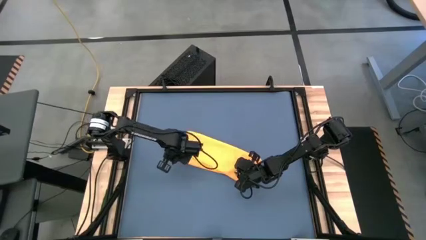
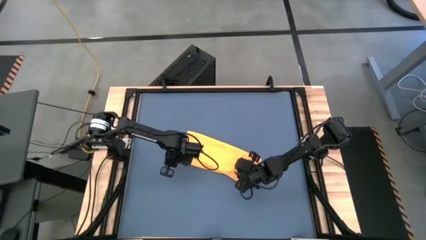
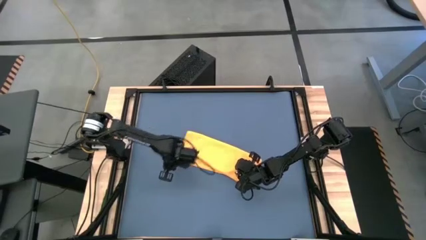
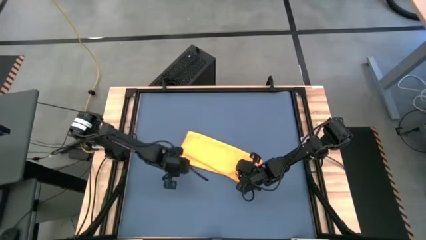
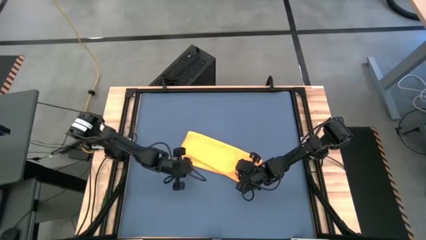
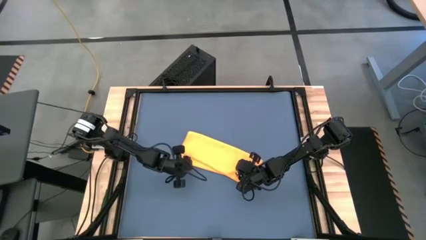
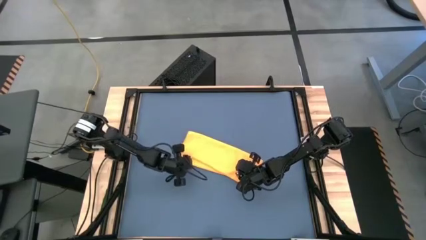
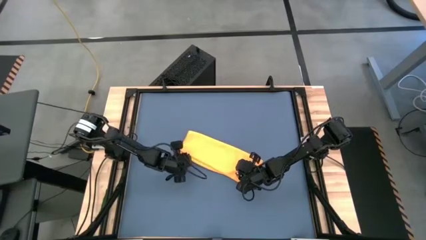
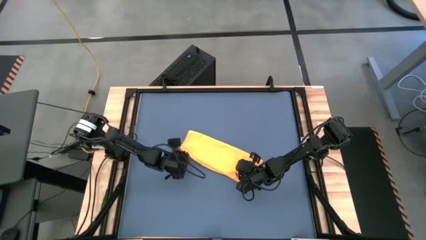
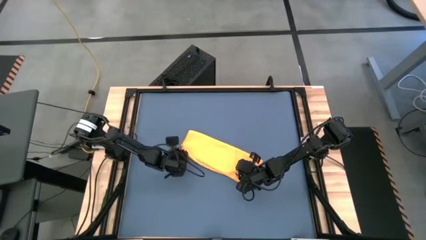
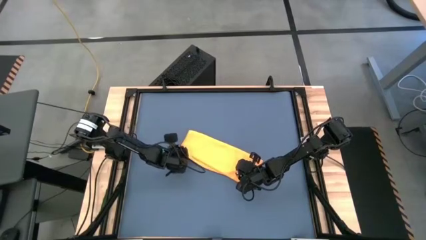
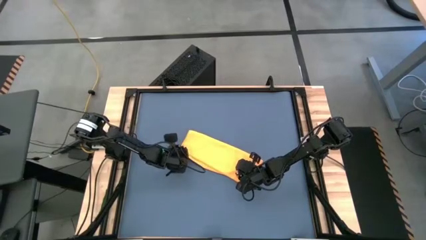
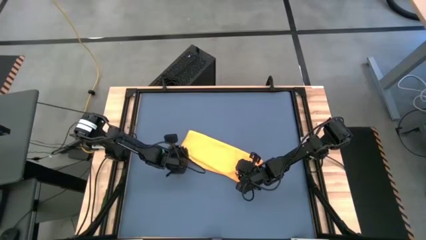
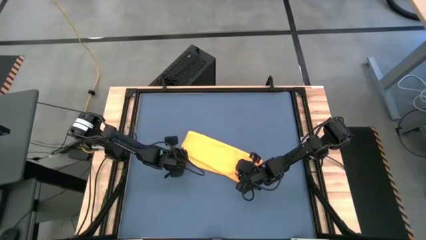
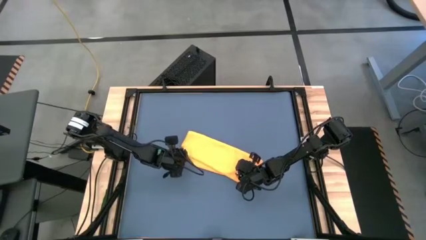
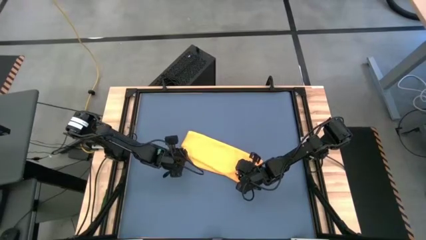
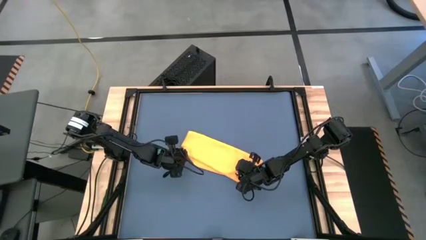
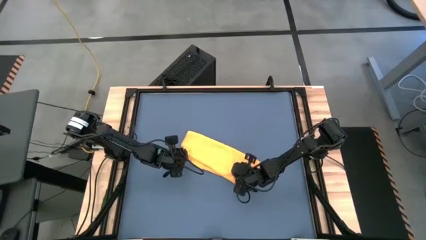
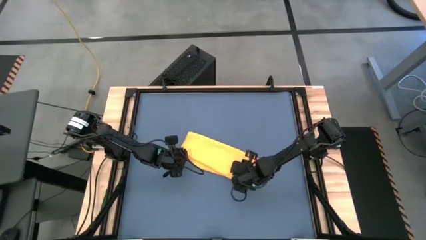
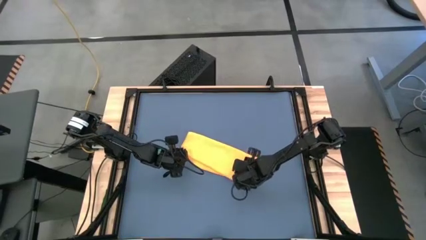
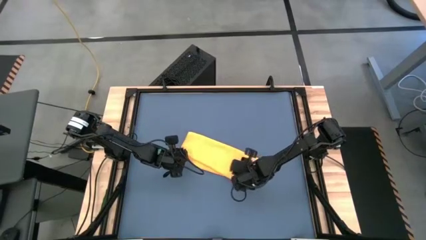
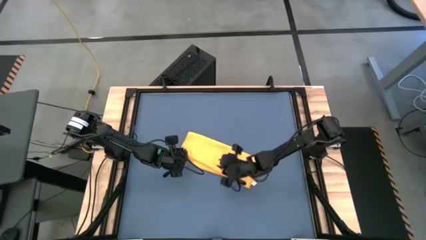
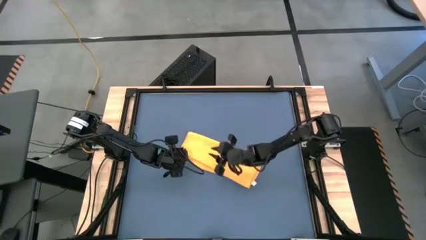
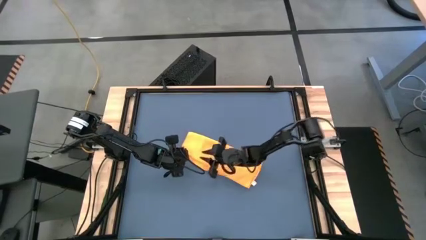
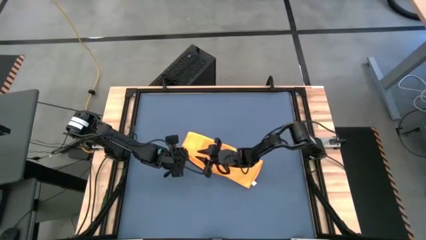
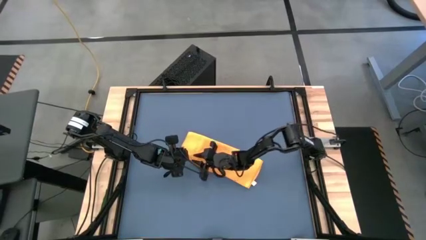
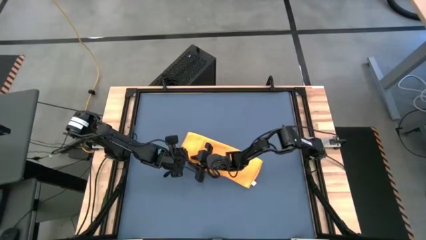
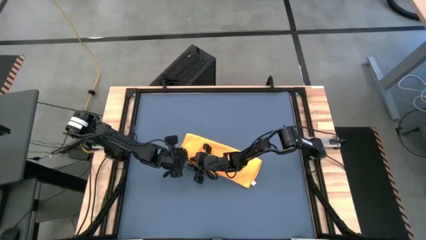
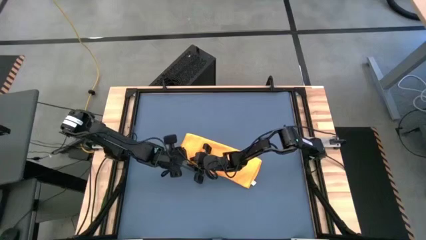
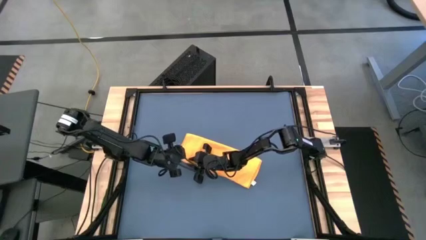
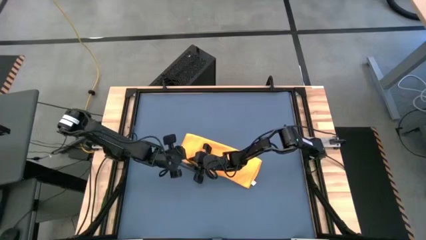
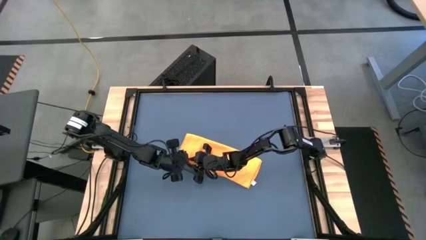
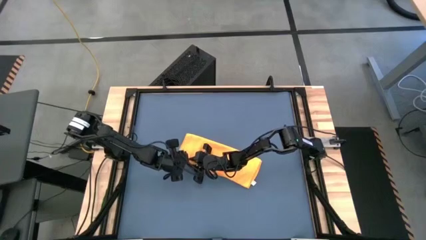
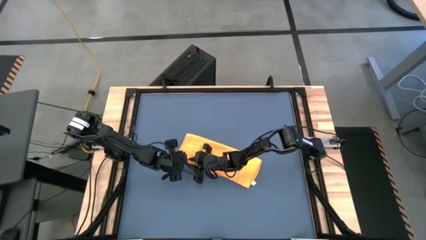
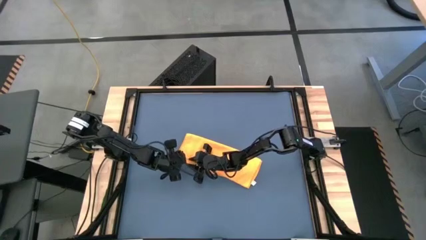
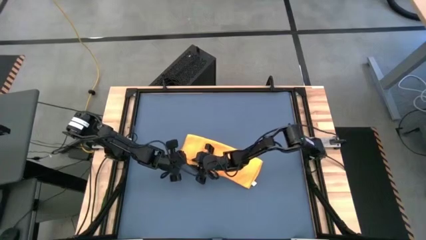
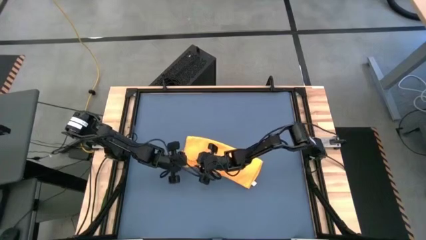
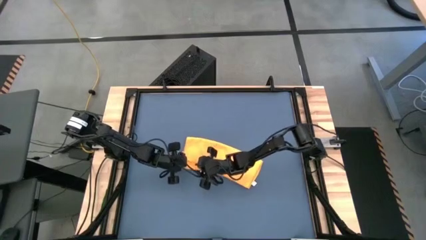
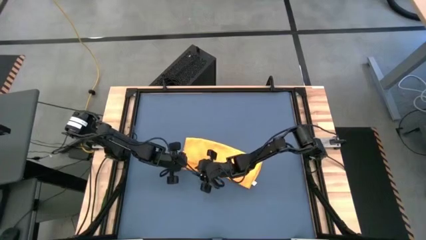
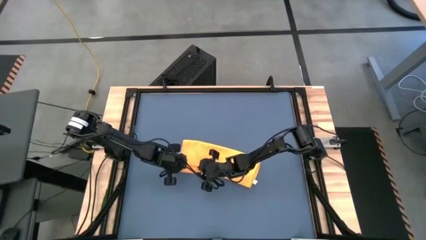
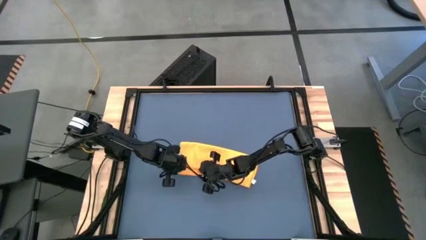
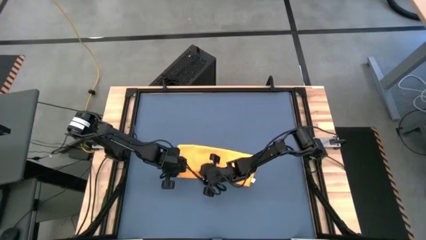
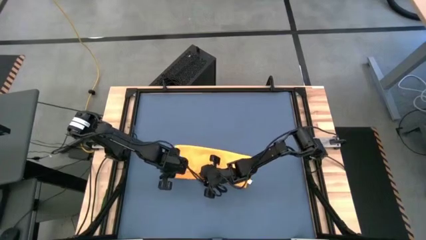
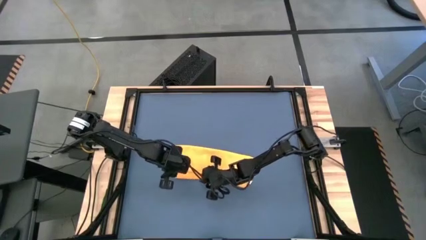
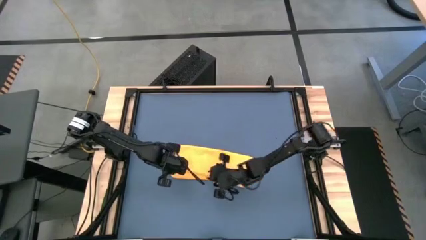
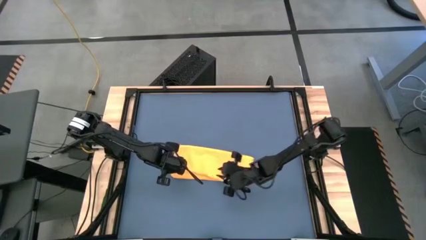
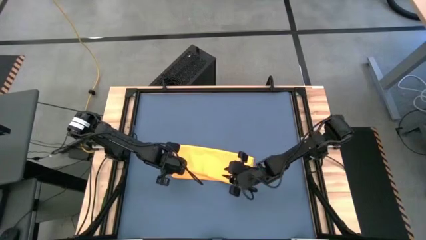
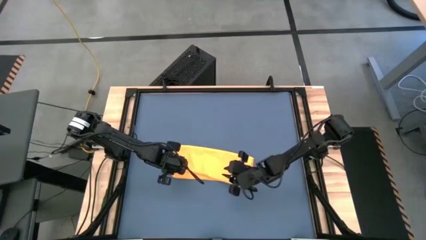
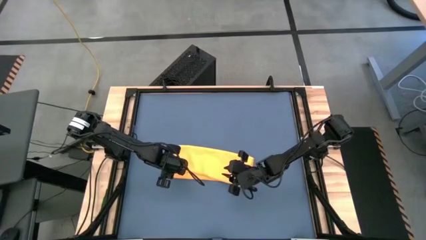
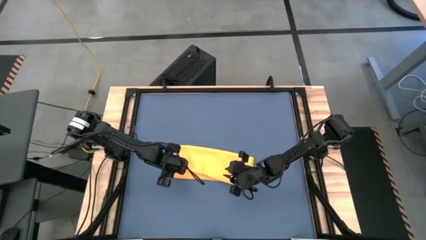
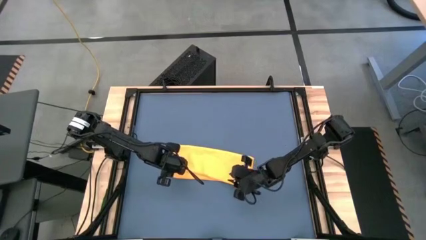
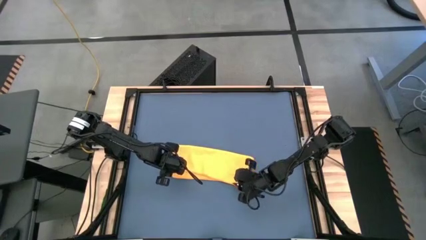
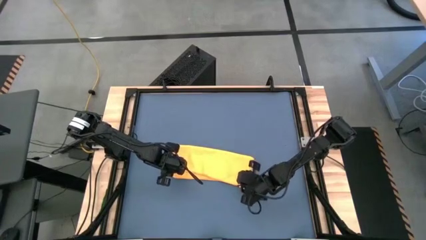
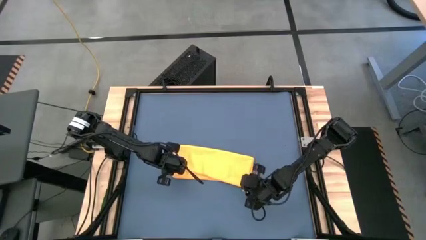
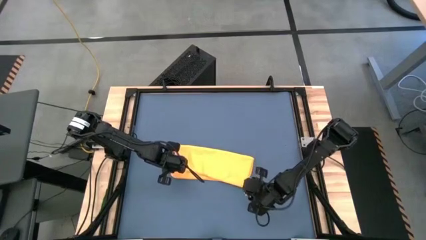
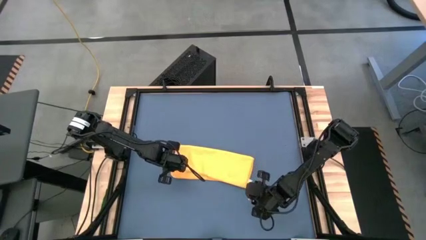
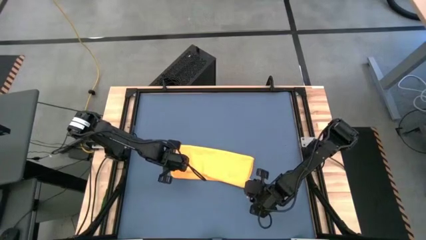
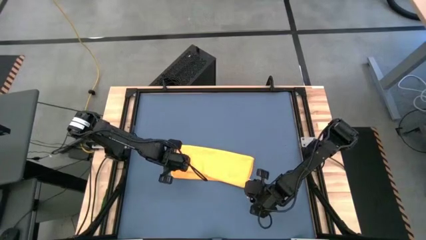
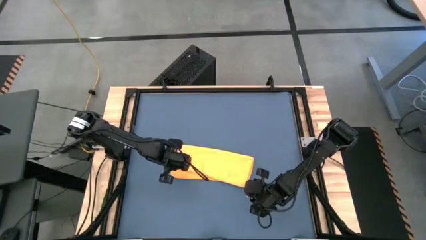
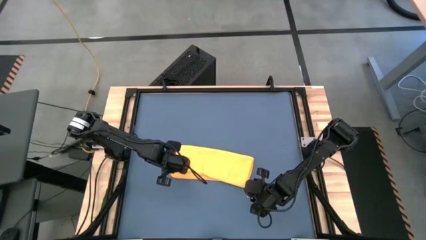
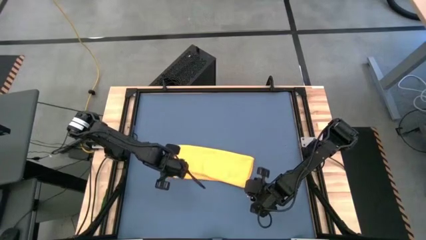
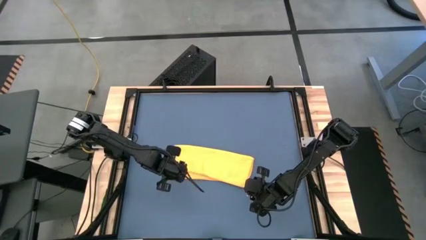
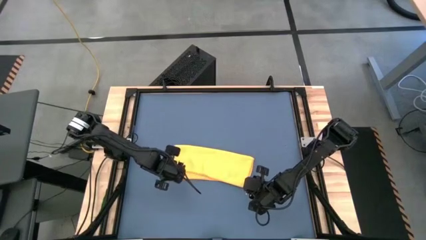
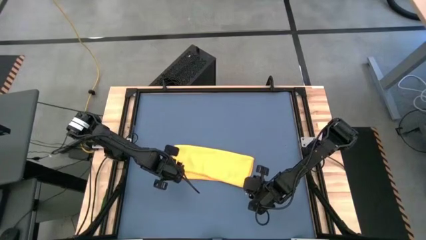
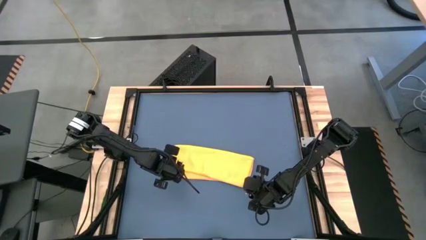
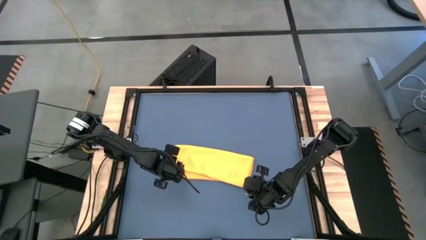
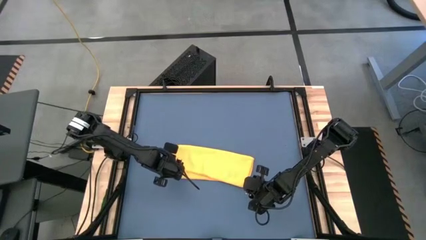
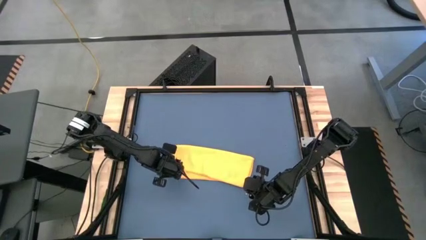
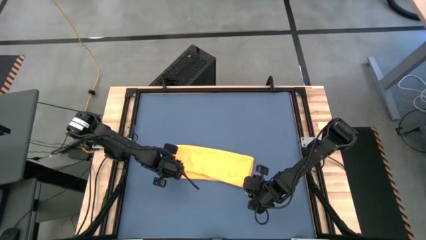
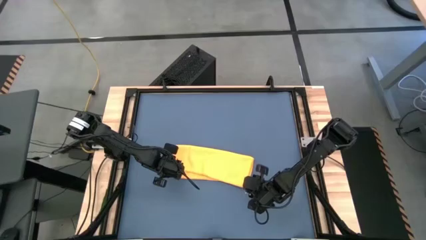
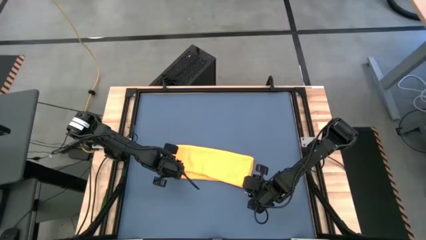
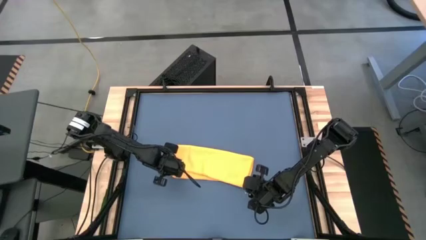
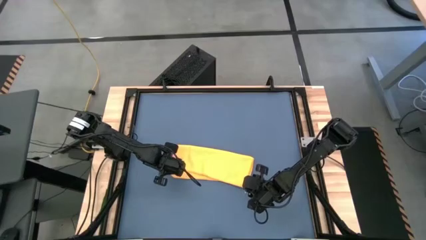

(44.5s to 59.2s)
Task: Roll towel
Fold the orange microfiber towel
